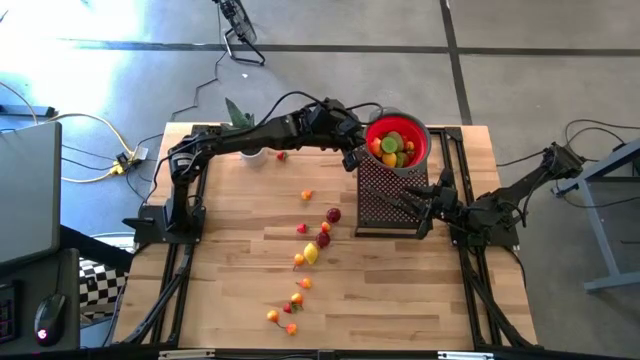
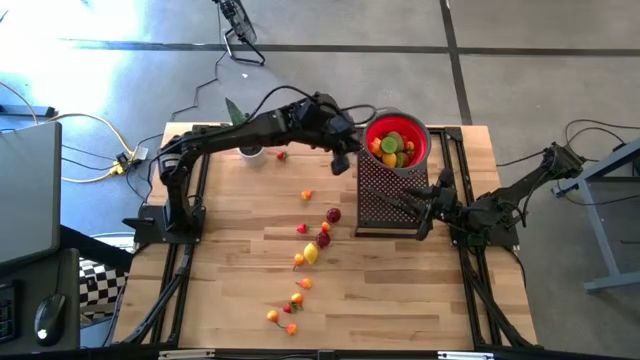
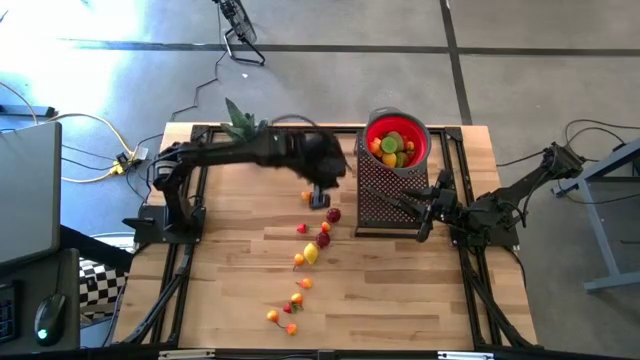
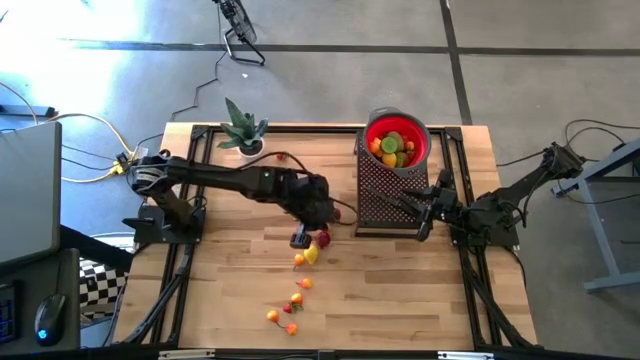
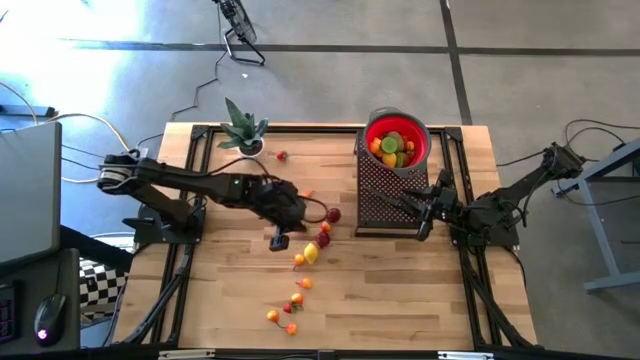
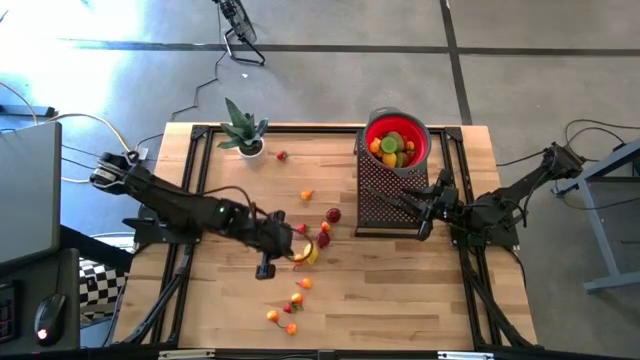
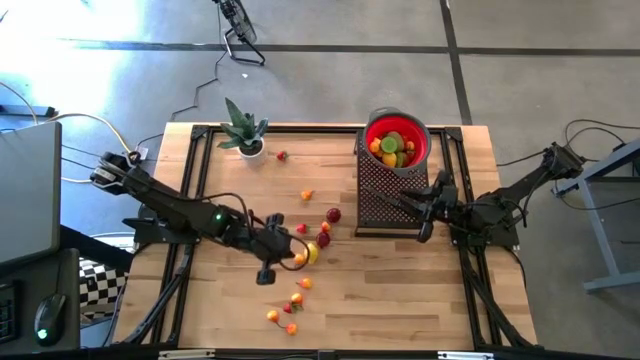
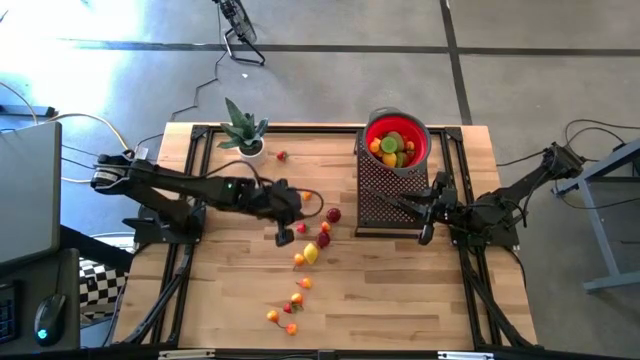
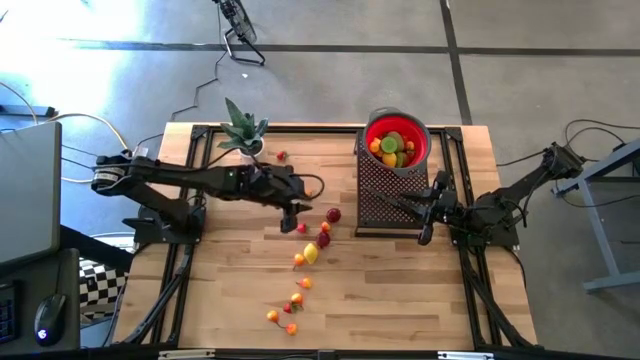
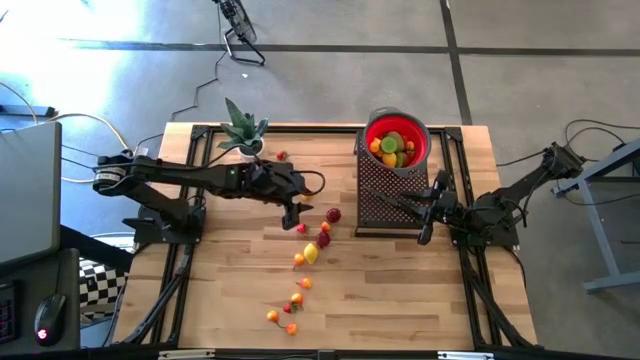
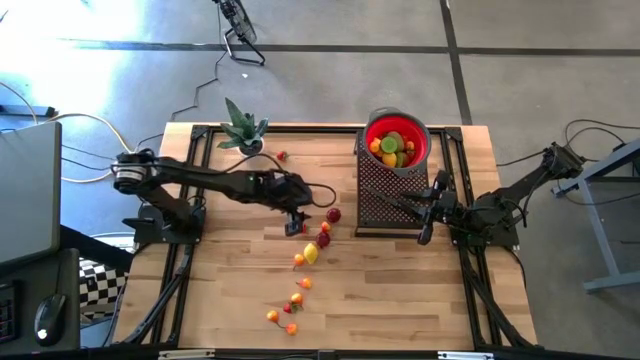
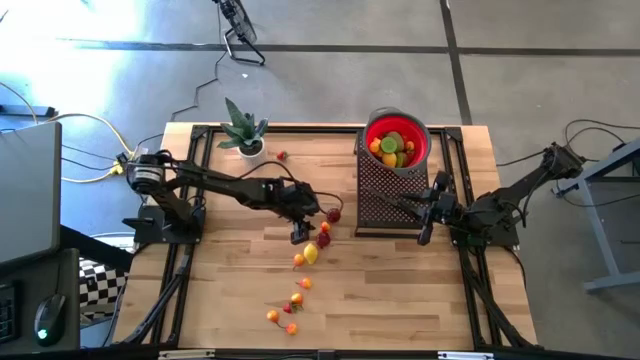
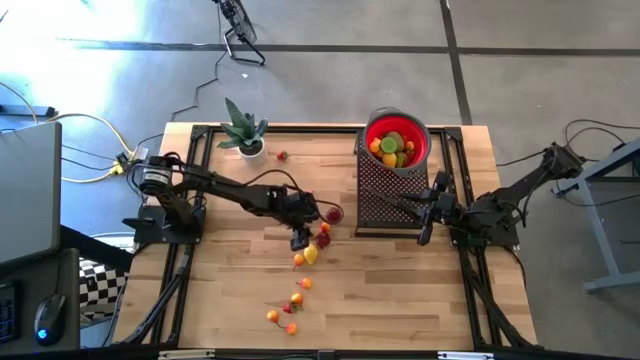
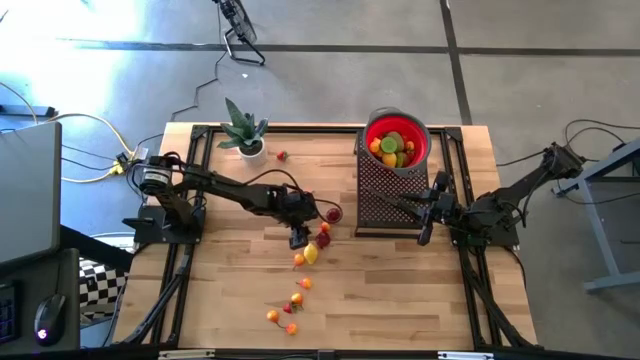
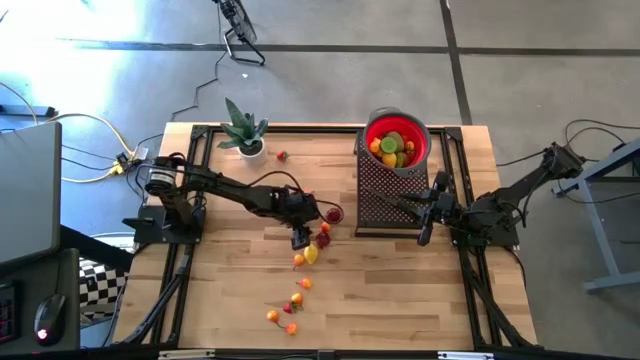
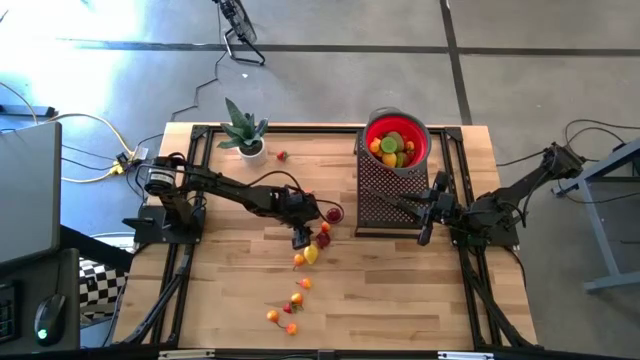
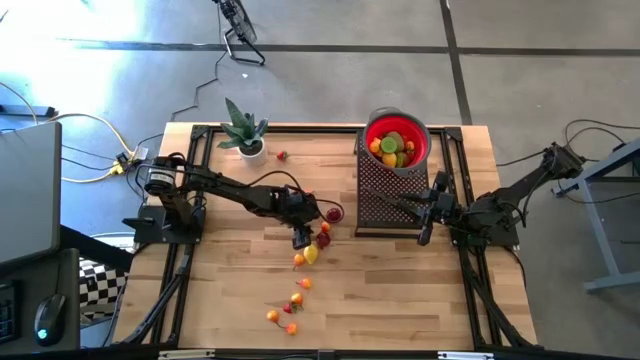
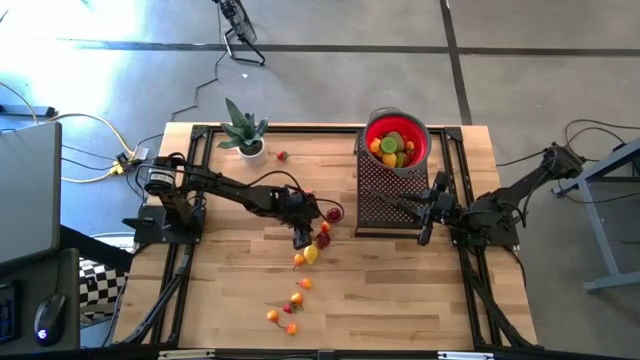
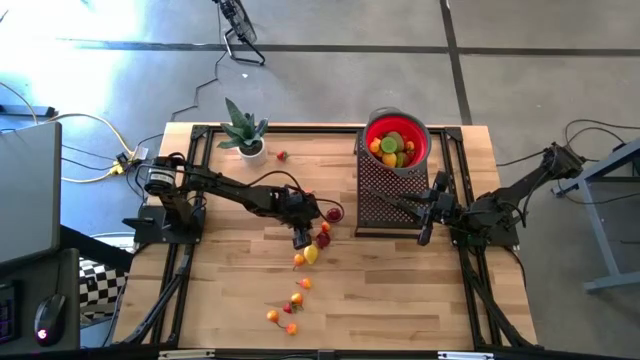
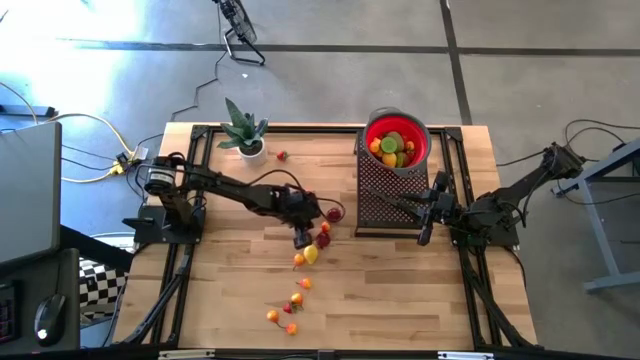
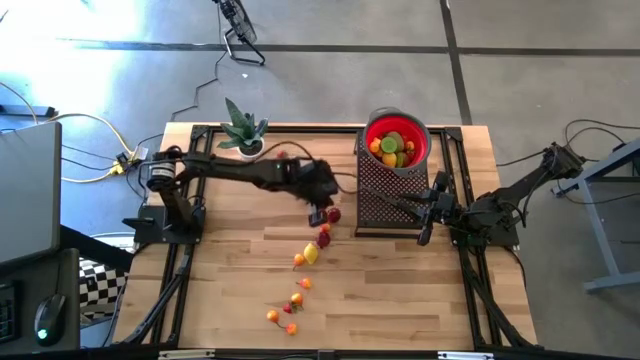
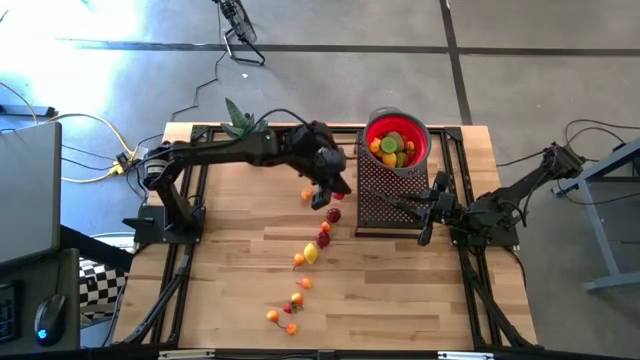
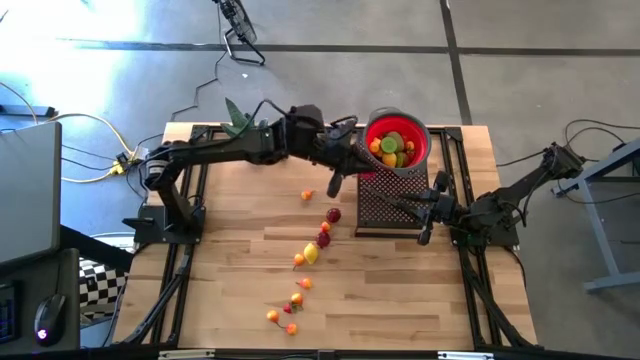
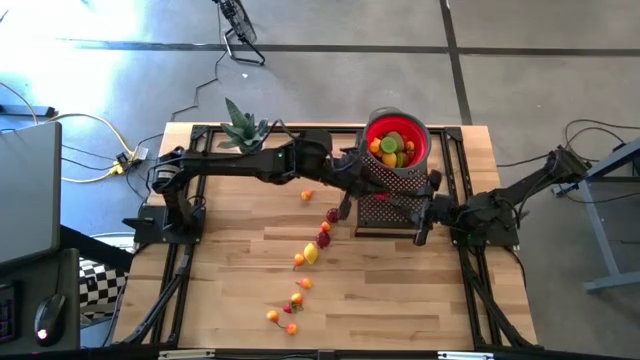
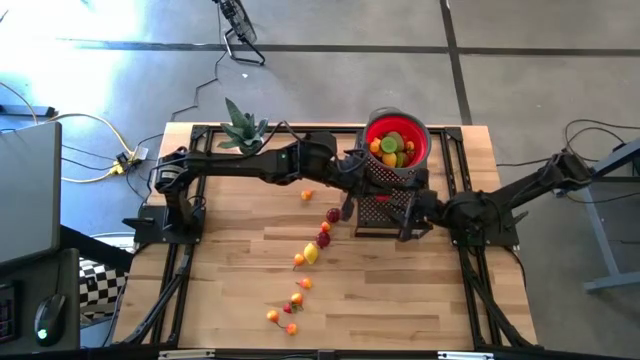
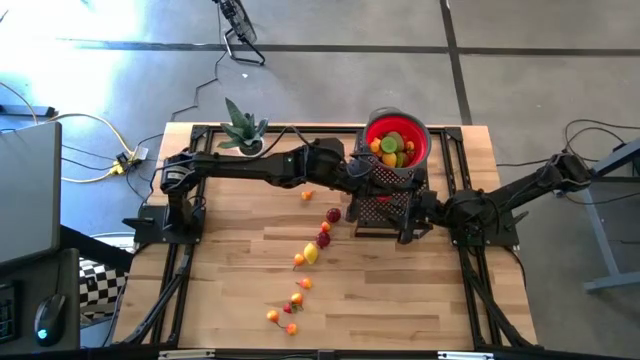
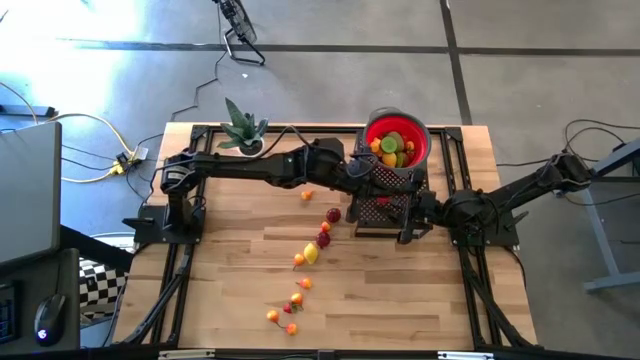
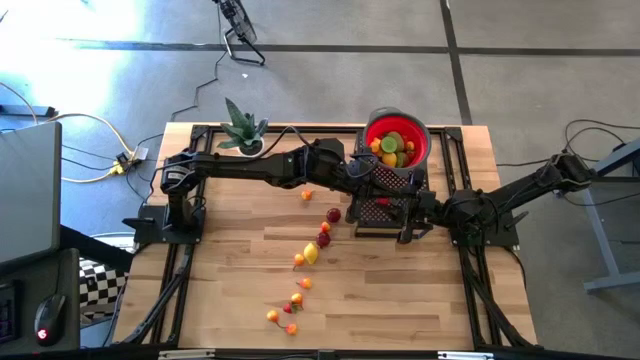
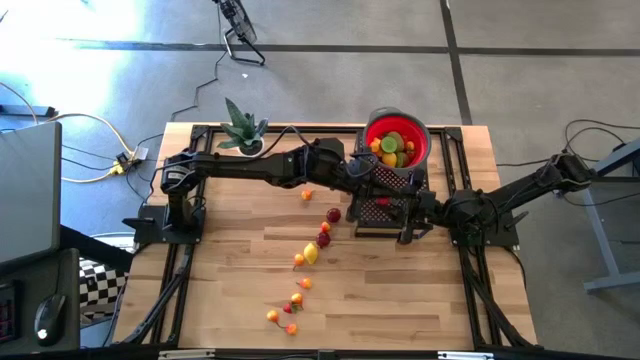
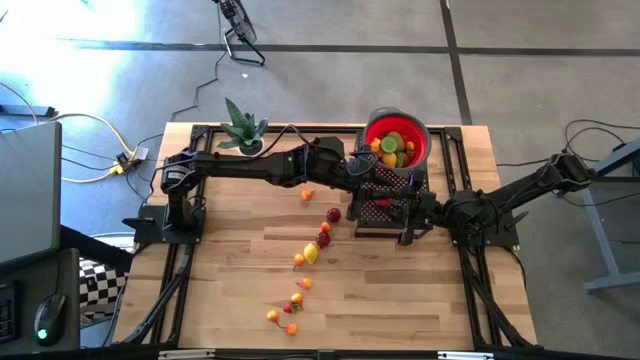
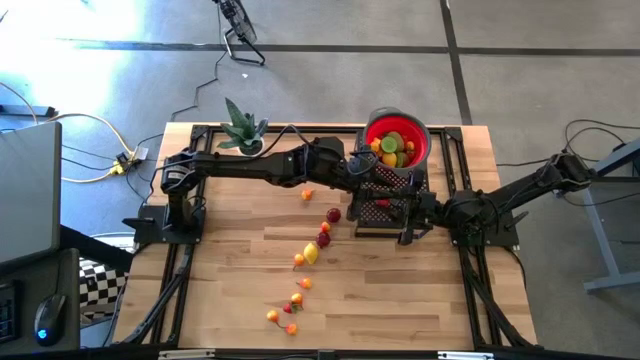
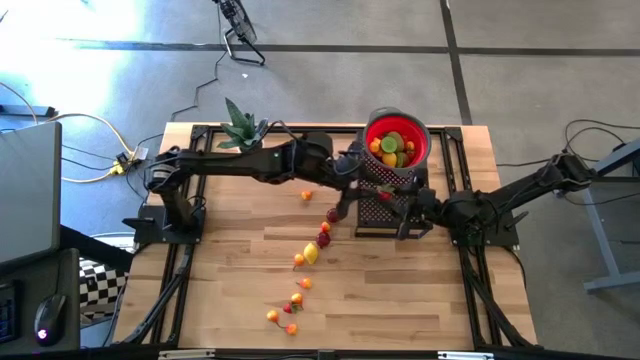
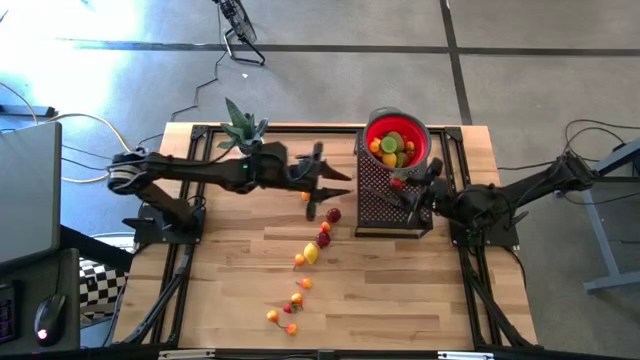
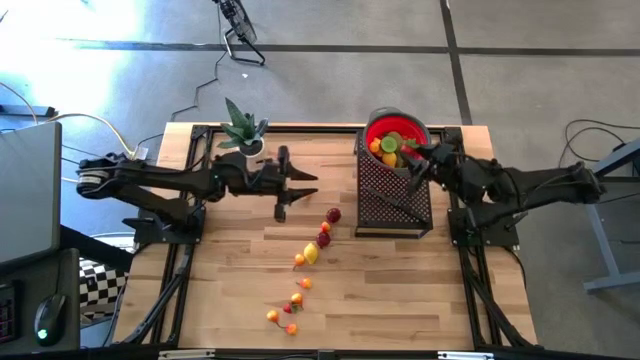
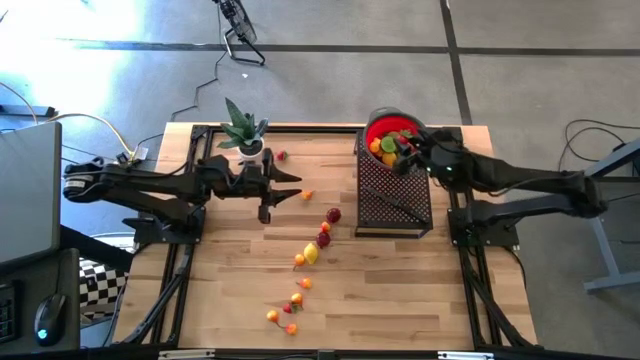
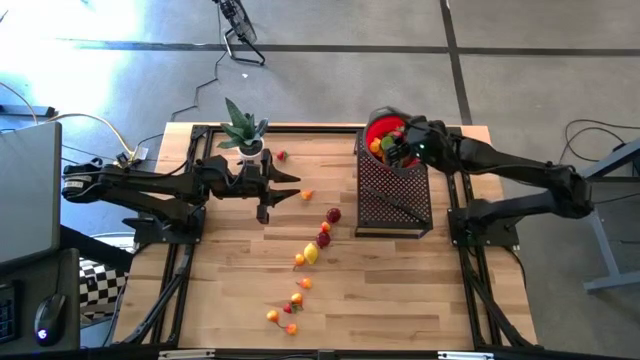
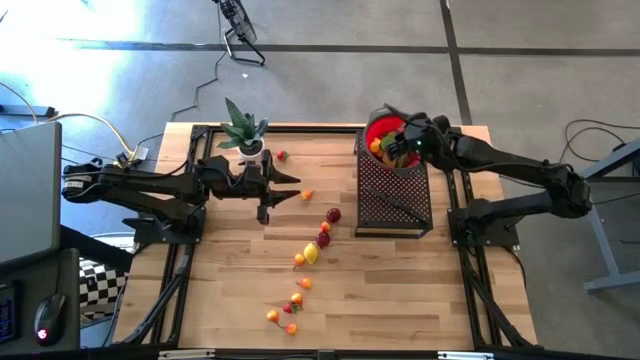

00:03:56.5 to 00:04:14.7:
Task: Pick & Place Fruit
Put the strawberry into the strainer bowl on the shelf

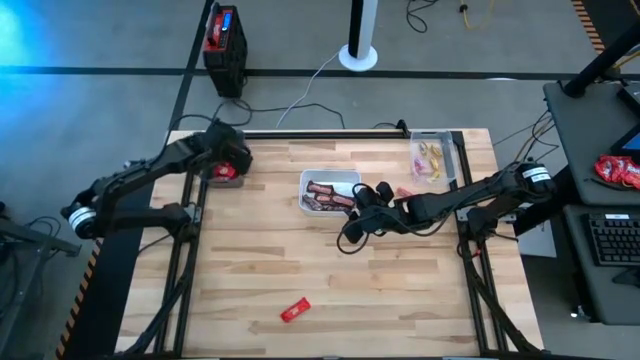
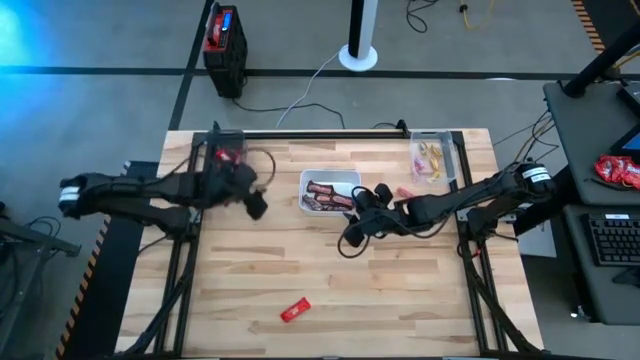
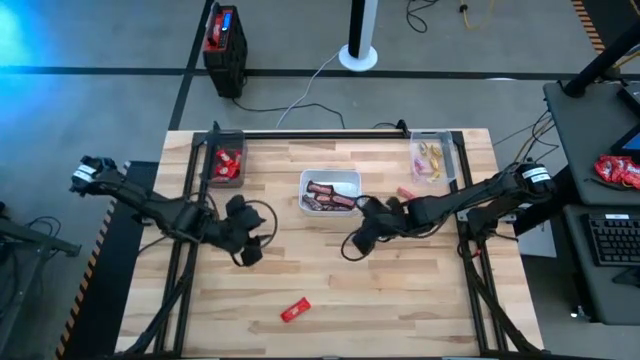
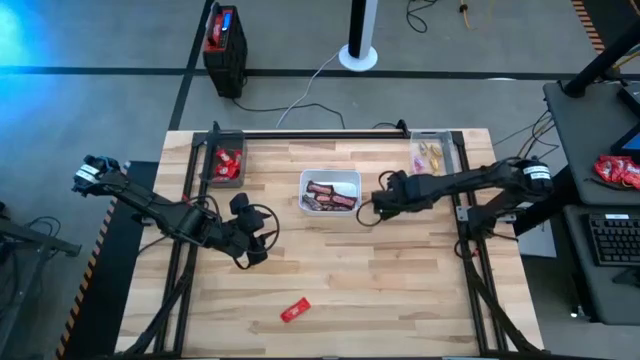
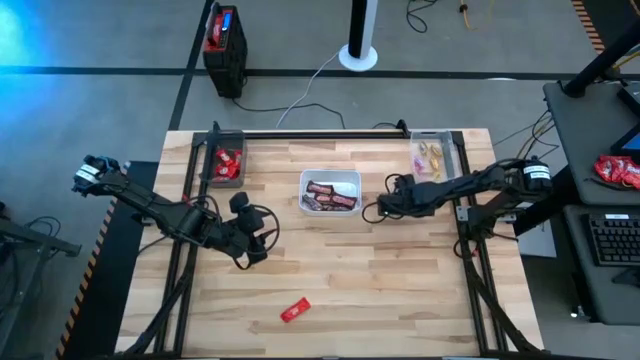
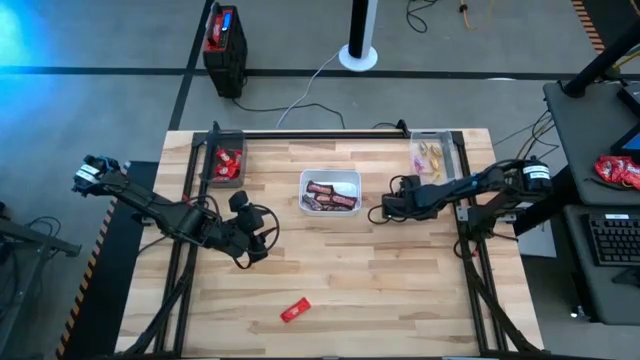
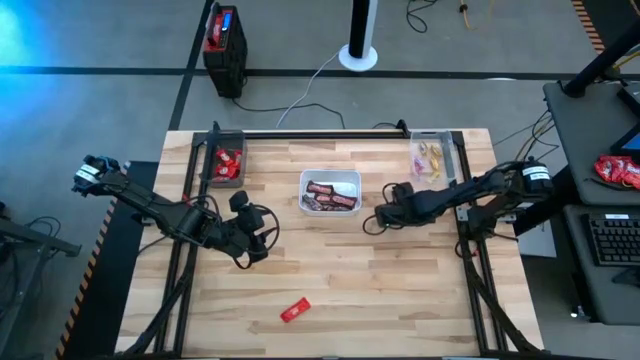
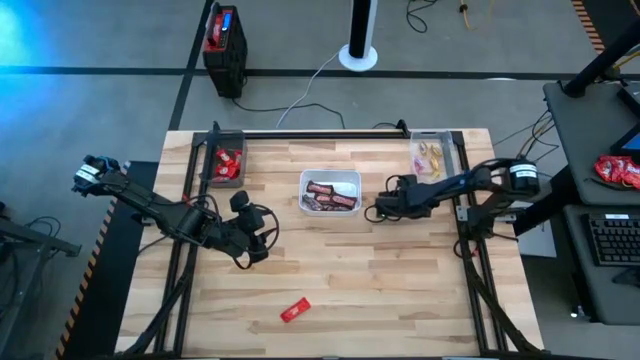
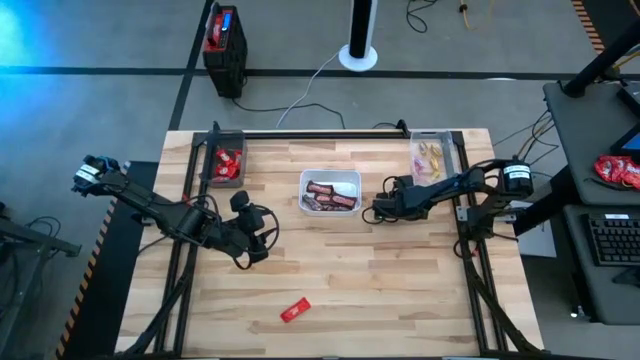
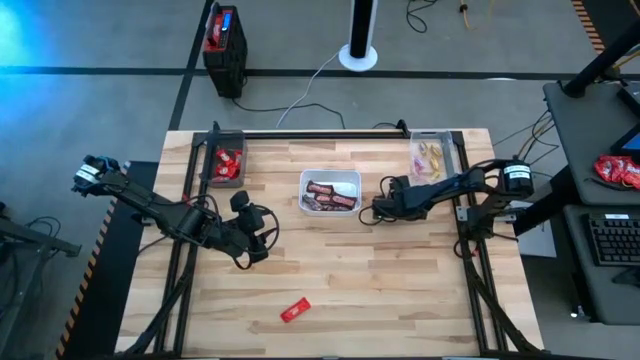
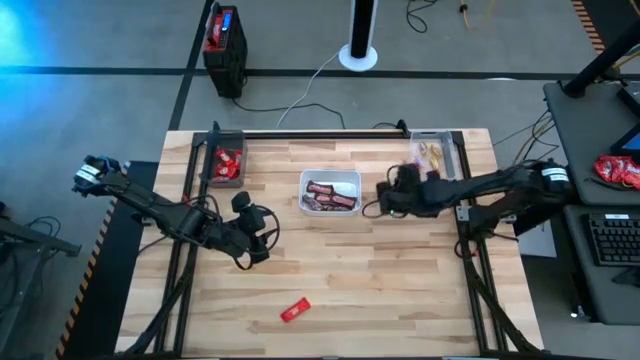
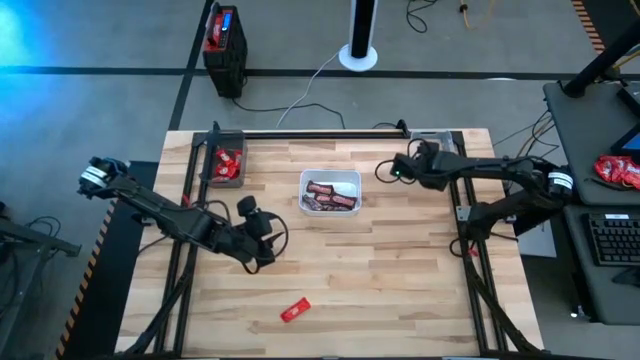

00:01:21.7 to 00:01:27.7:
Task: Sort candy by brand, put in halloween buckets
Put the red candy into the transparent bin
